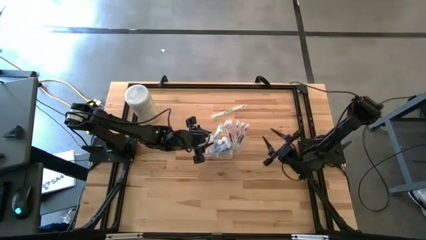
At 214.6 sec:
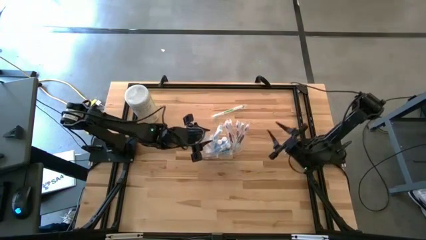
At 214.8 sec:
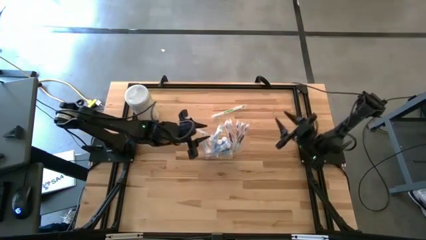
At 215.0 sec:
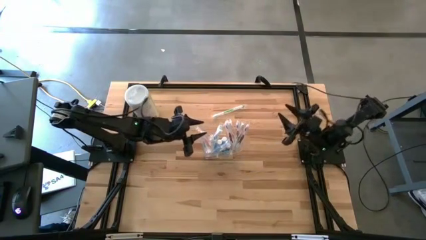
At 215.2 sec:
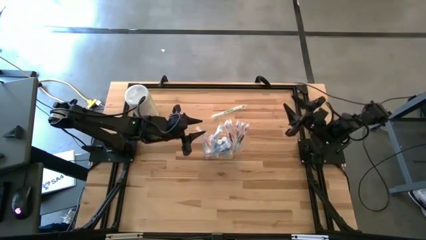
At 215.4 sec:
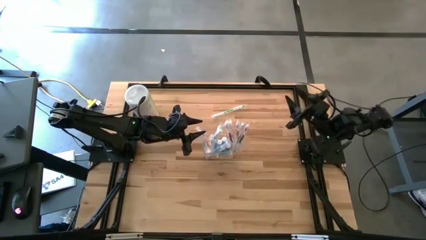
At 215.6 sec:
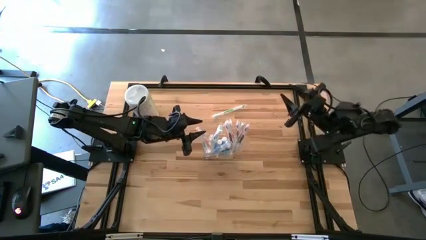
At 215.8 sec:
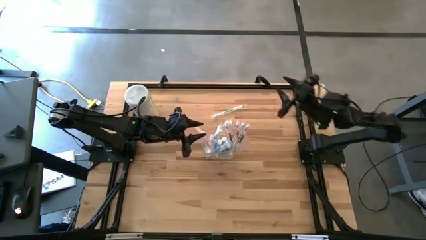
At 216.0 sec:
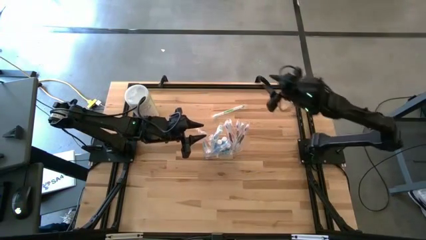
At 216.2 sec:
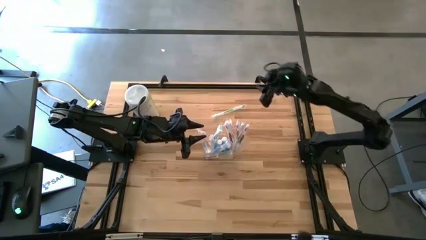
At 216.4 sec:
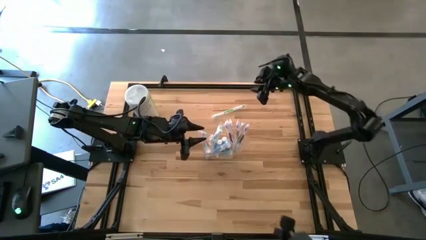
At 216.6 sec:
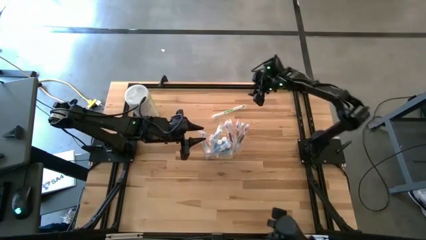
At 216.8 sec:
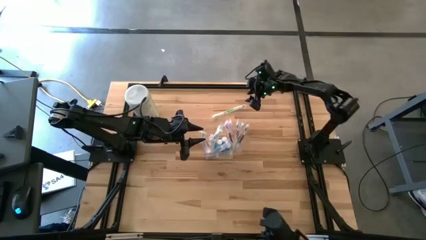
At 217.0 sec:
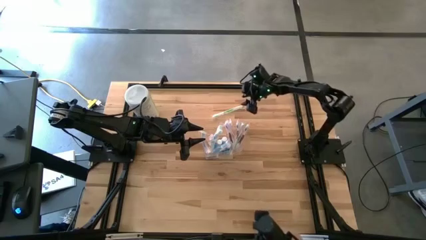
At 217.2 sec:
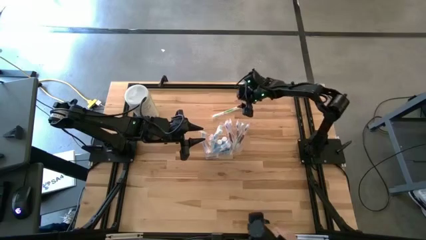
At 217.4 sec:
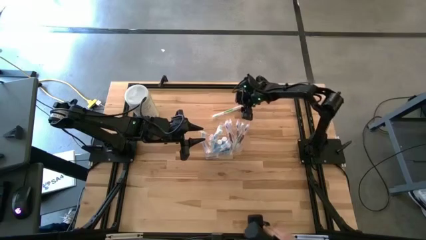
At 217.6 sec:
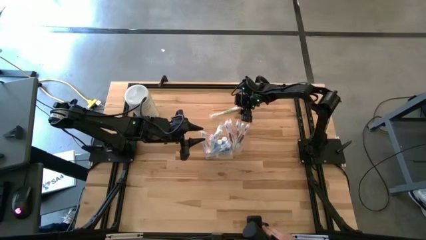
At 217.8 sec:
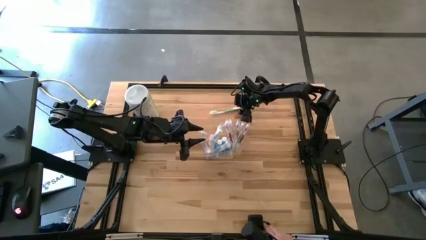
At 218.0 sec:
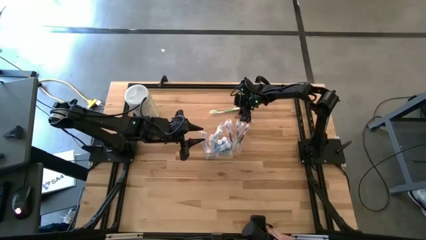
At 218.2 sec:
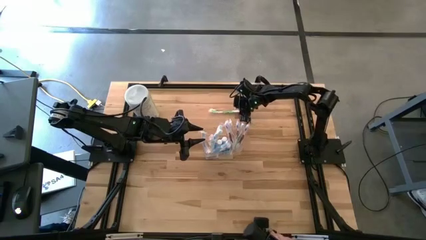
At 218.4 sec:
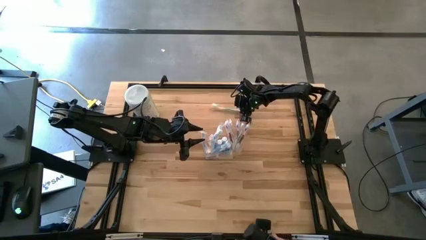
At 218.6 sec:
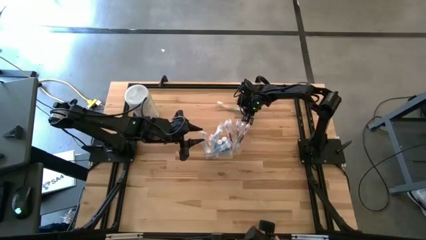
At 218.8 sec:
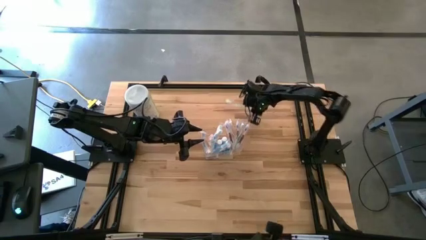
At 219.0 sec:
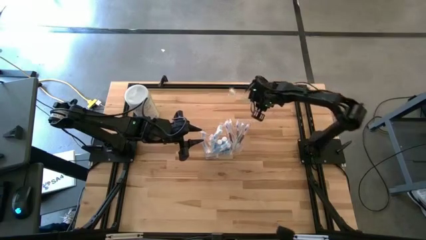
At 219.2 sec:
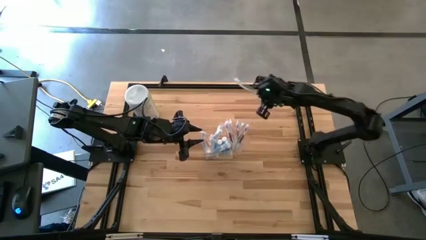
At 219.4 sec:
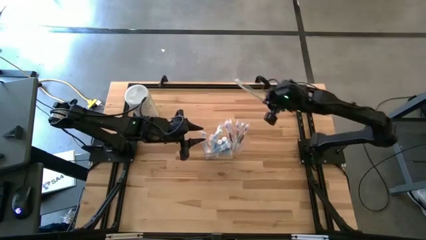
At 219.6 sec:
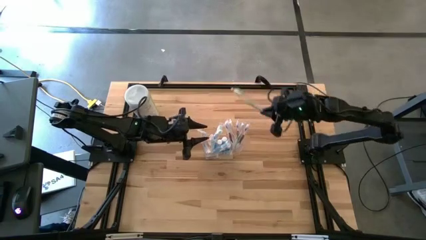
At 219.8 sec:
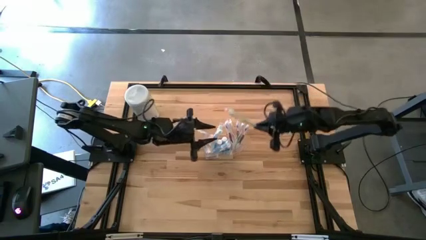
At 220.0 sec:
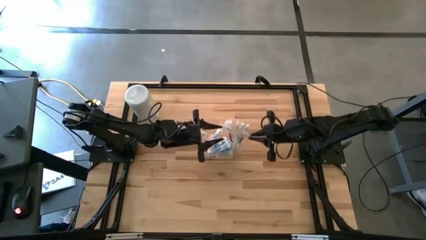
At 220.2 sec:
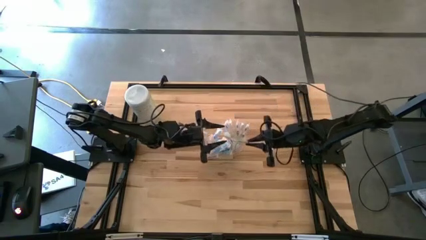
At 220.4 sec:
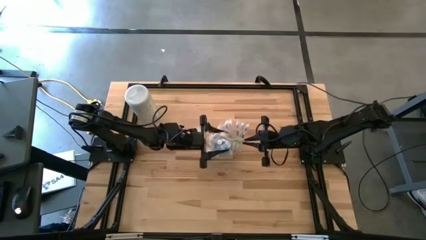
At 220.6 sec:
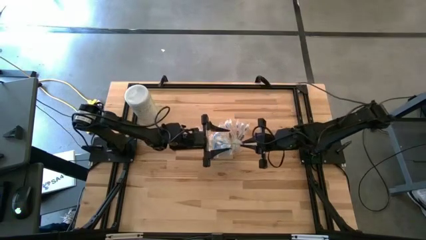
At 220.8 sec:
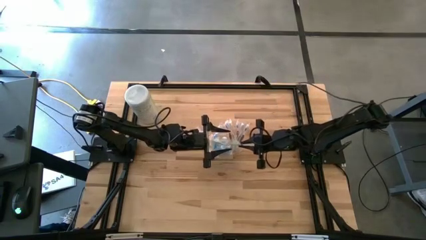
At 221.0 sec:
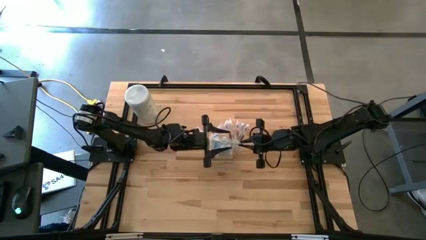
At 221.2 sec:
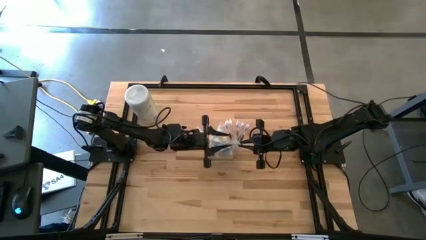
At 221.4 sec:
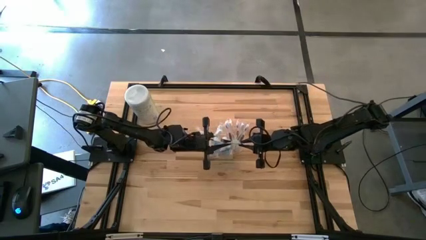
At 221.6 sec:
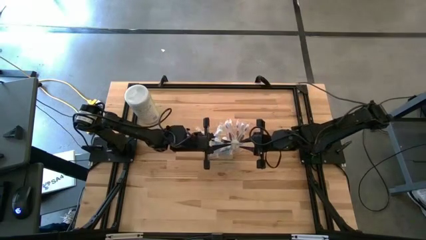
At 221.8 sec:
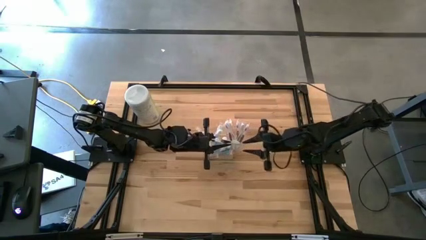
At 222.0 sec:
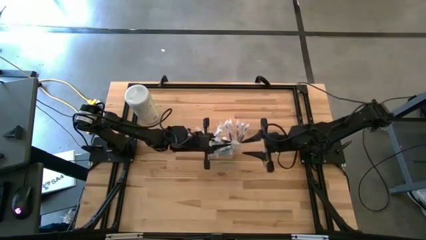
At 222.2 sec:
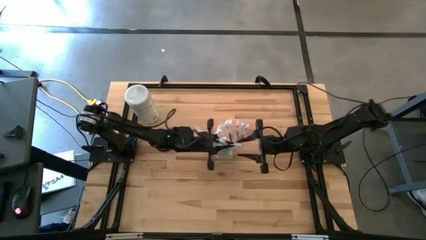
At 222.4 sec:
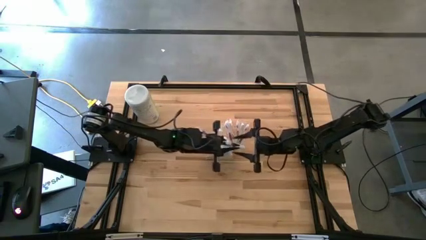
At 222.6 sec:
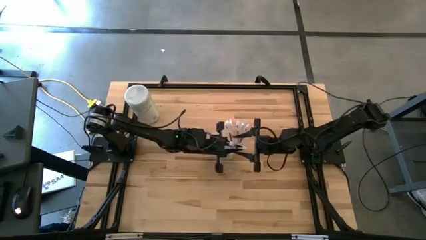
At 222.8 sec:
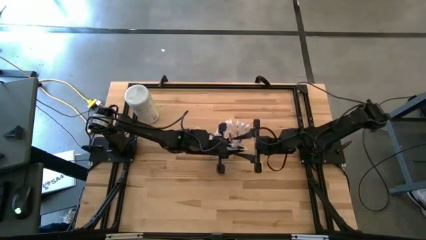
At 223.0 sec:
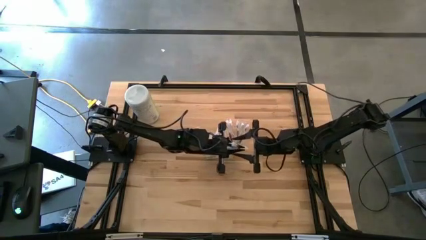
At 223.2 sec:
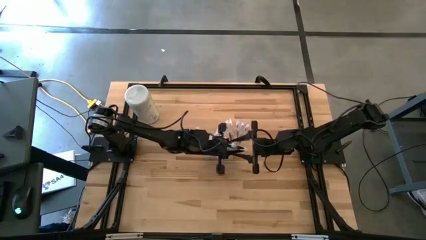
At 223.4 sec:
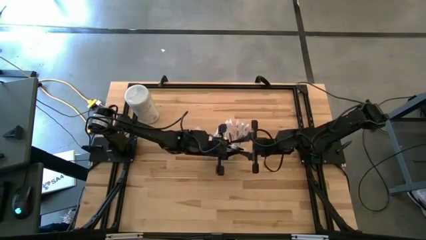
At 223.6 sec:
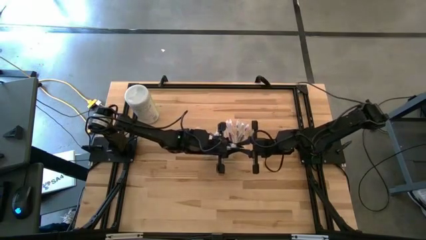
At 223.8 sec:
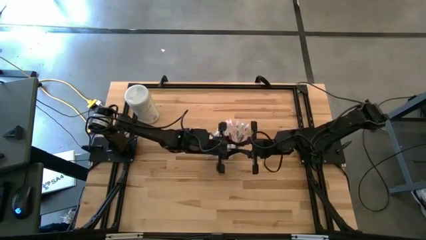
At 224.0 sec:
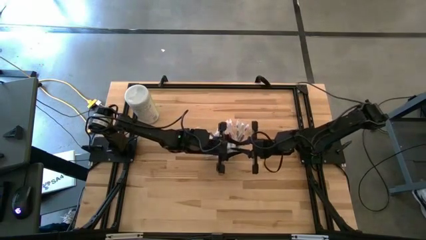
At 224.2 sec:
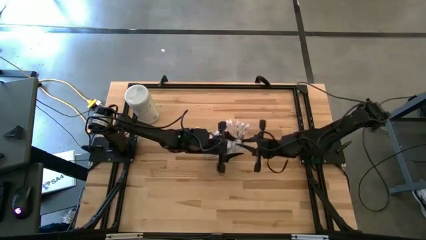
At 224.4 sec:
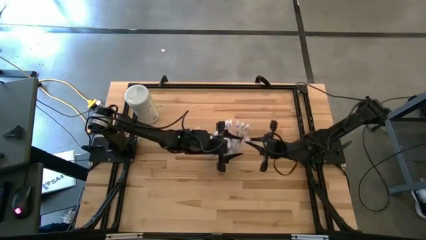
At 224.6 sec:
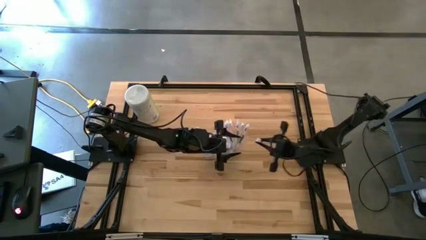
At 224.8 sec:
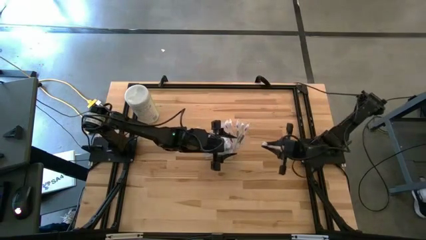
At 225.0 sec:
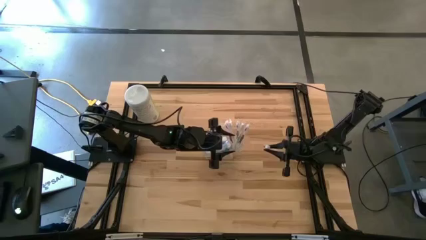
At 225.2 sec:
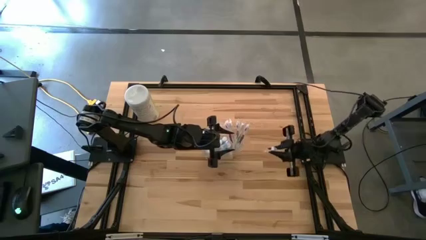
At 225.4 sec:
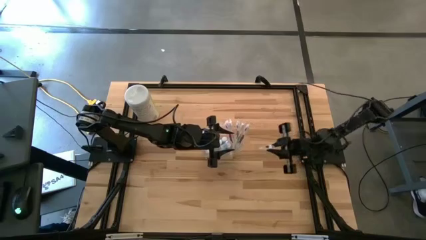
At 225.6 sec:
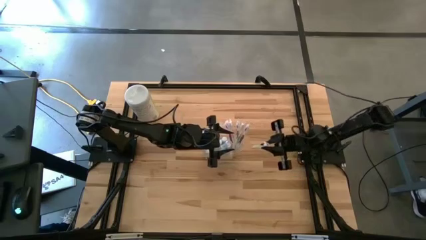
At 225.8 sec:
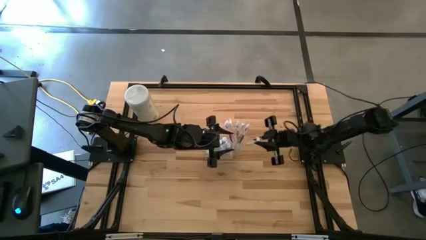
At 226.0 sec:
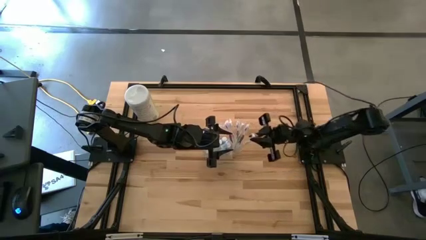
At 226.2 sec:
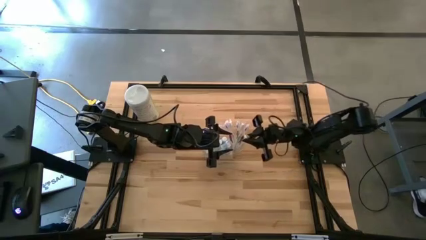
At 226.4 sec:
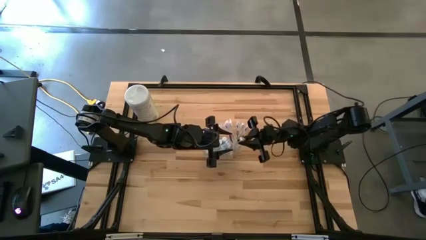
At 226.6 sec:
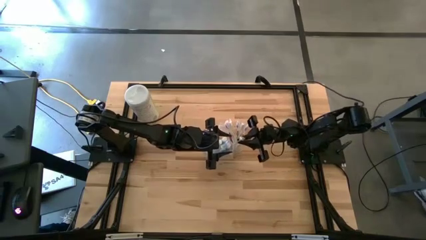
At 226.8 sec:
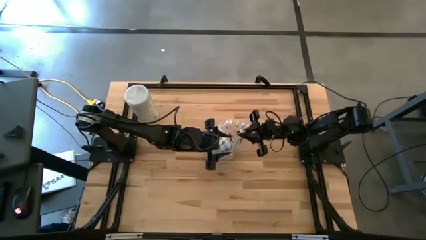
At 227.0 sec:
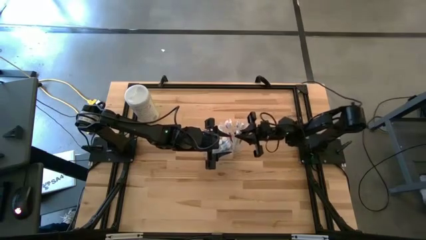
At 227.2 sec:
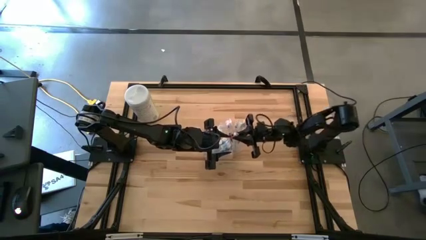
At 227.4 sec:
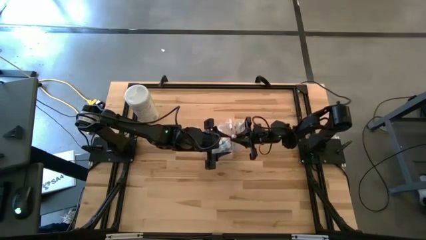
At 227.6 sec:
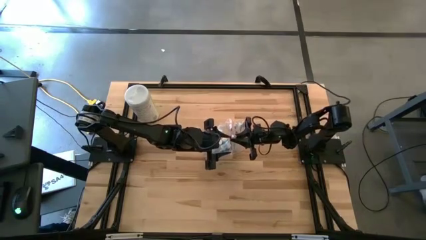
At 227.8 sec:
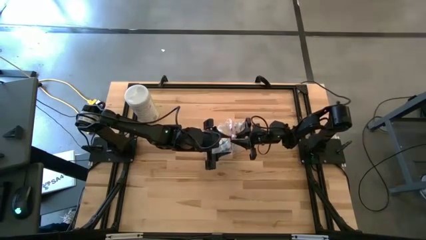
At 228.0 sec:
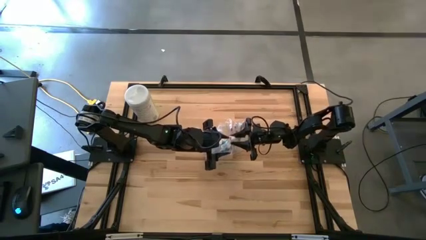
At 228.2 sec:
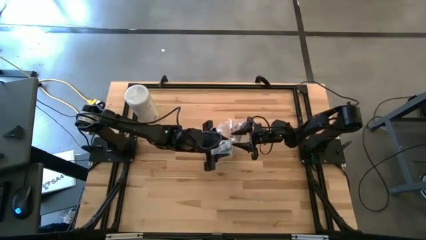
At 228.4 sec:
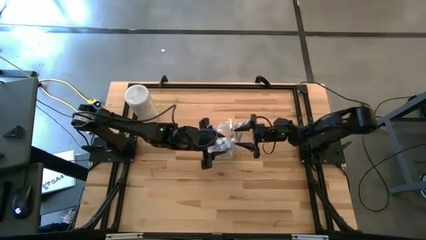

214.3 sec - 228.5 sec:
Task: Pick & Place toothbrushing station
Put the green toothbrush into the transparent organizer

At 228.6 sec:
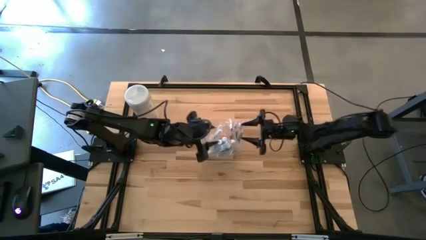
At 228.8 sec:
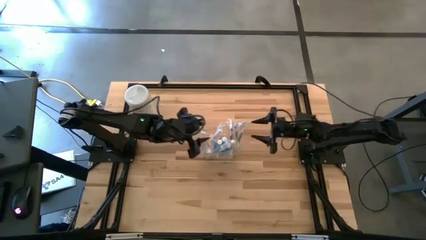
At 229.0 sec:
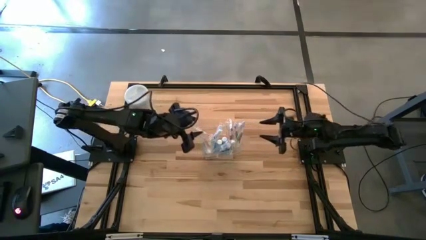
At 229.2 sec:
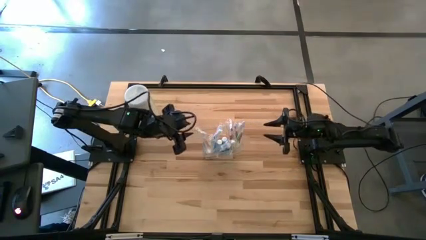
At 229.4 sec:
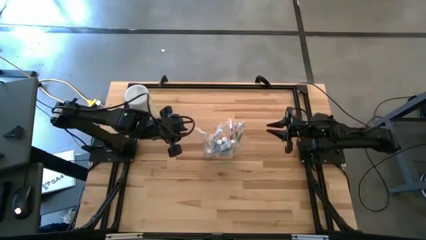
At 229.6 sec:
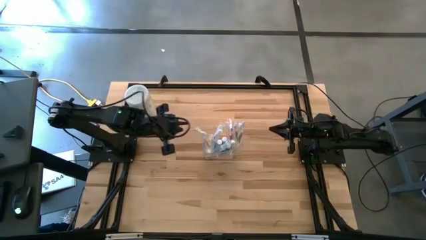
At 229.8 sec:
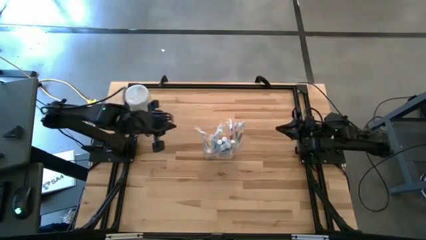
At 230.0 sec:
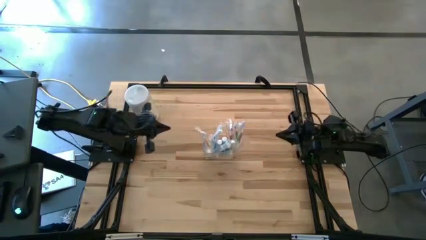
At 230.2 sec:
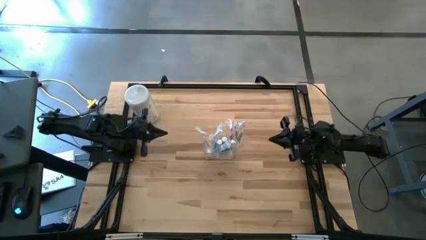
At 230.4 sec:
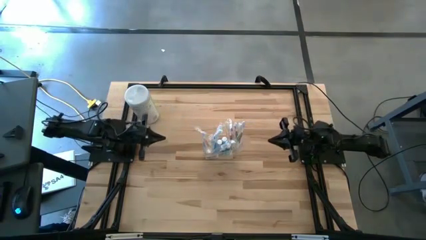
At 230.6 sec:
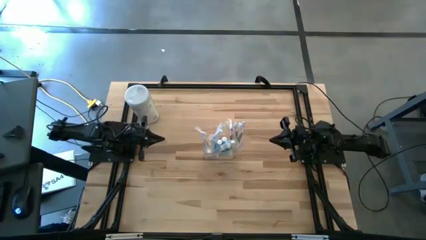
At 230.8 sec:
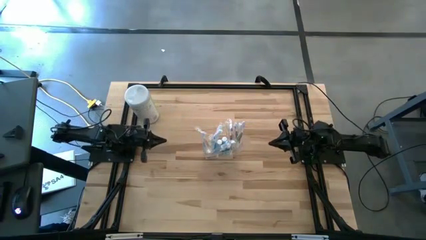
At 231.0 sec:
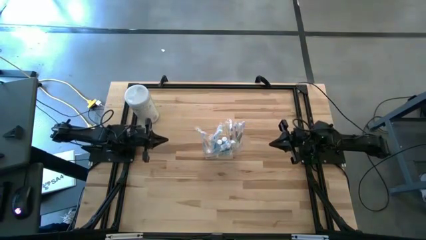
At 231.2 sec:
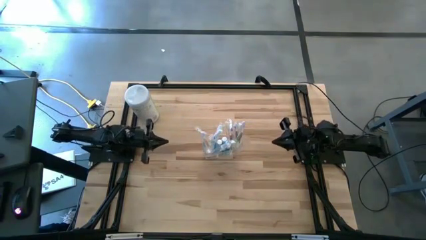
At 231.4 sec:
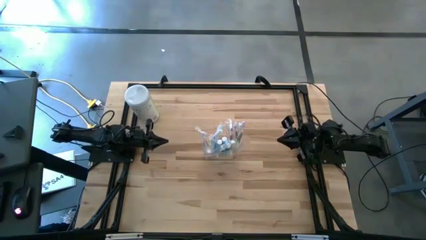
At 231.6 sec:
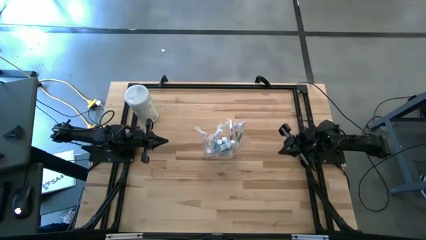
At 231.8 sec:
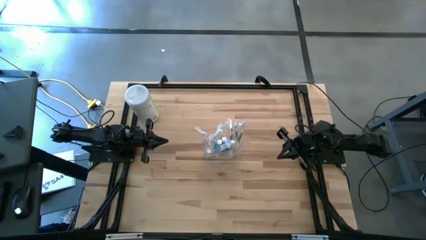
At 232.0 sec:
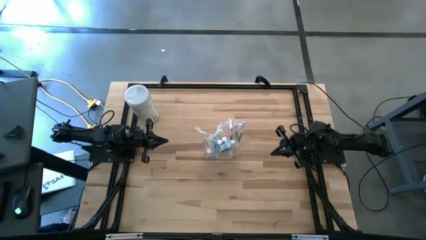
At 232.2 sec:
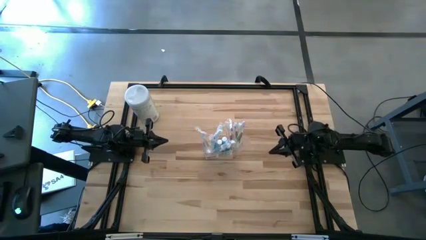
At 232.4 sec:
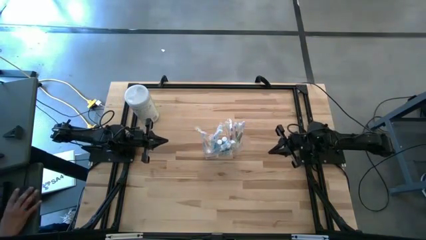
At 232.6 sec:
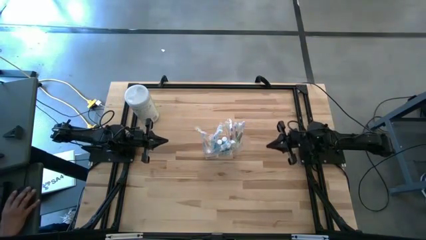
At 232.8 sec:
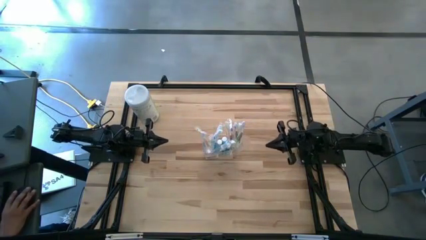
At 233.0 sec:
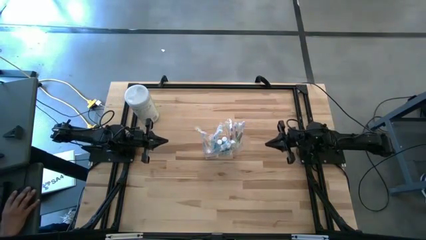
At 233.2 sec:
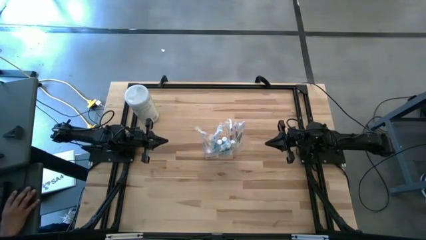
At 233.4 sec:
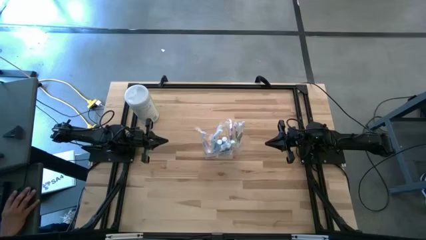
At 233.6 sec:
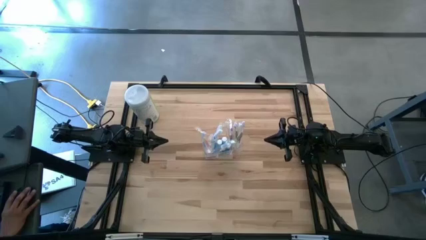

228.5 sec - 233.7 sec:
Return to Home Position
